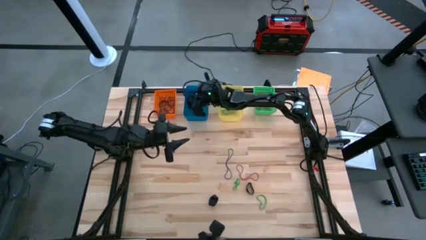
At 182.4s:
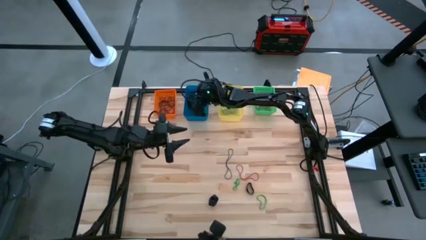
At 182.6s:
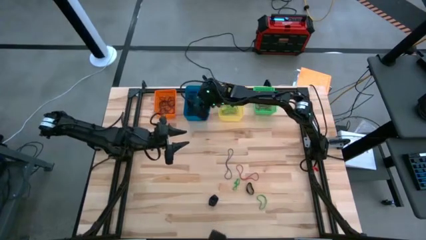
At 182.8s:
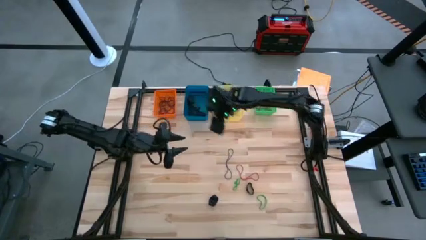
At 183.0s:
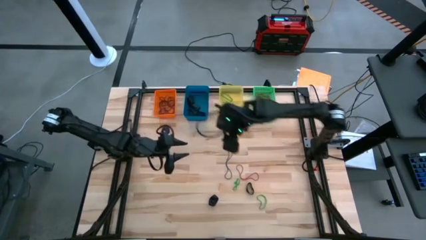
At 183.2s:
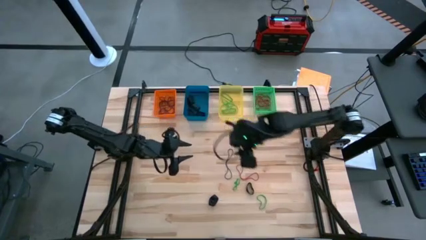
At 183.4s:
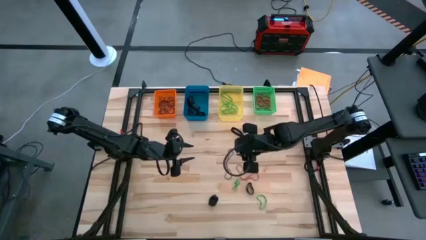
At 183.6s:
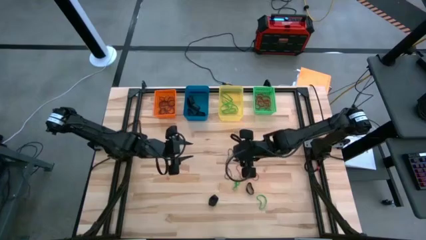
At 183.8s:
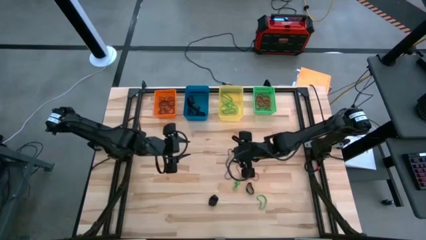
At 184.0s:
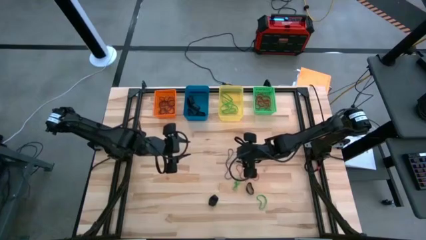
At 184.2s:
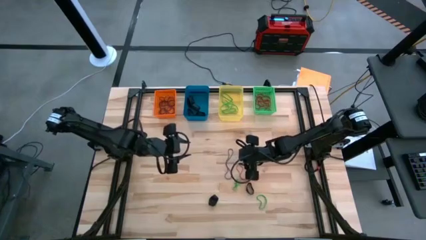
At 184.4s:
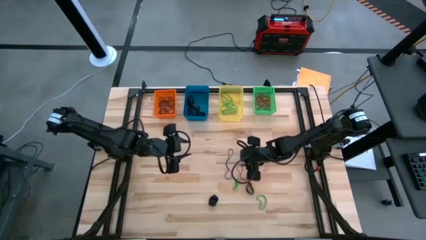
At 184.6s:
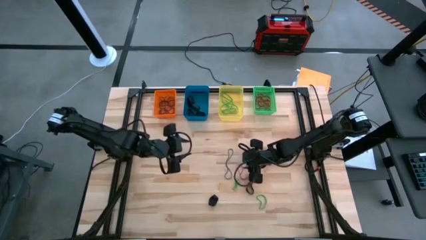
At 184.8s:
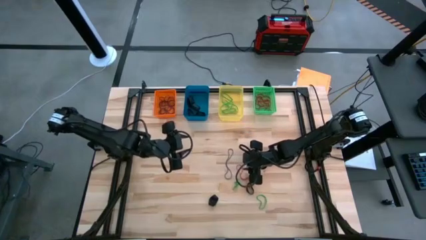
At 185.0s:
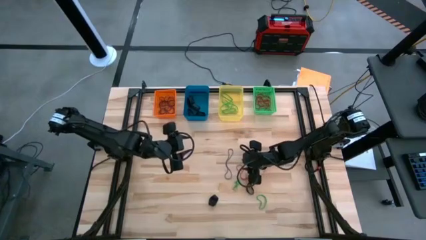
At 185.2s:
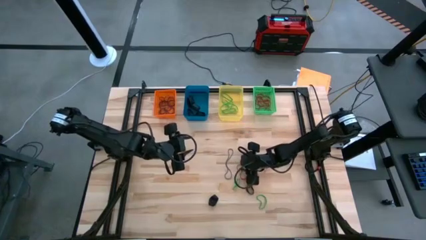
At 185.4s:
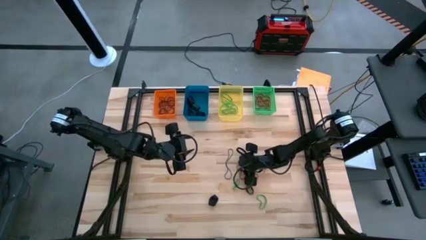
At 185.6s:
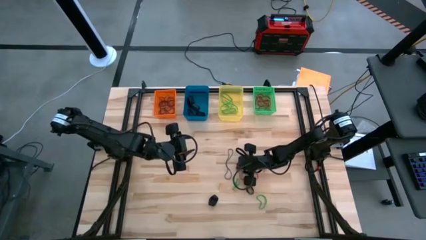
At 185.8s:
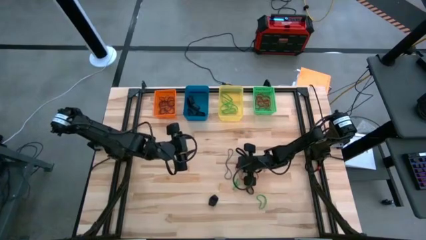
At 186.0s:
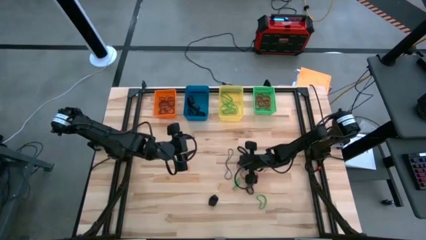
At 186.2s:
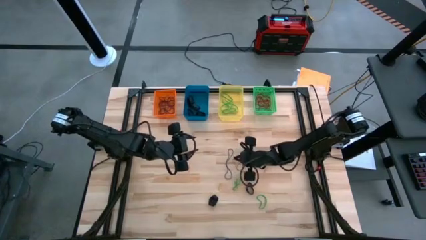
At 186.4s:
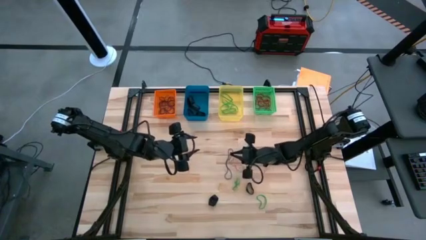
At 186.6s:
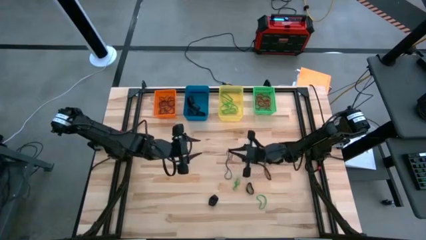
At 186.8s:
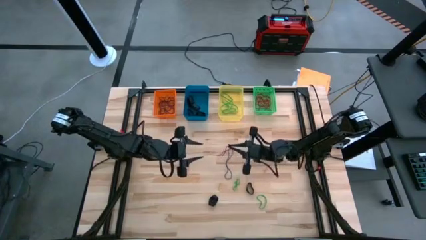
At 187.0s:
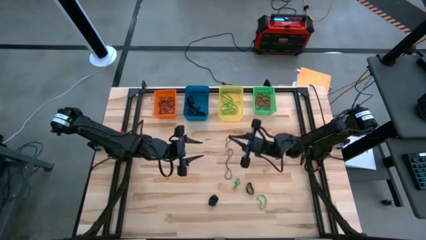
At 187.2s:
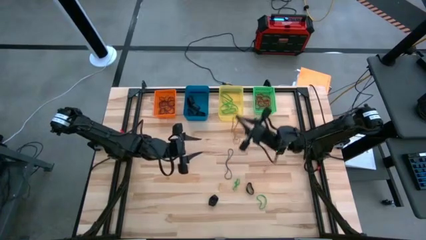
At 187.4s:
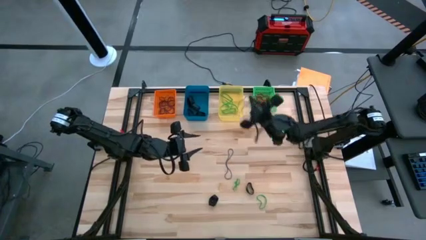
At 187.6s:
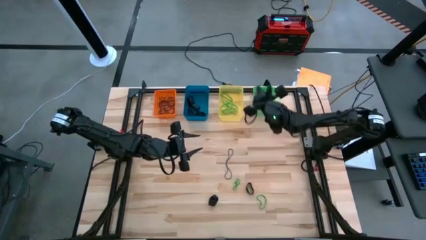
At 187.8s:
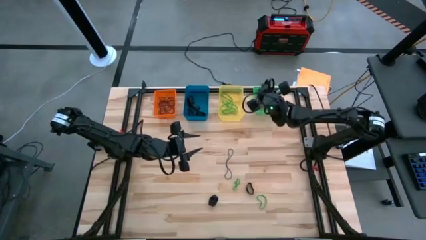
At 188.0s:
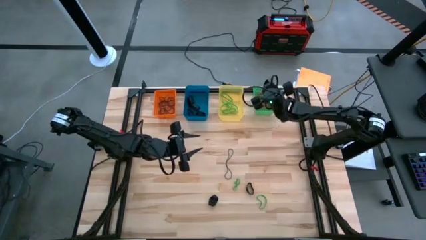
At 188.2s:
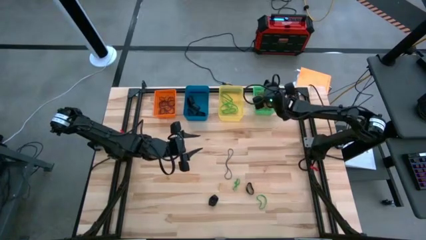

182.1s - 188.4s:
Task: Sort rubber bands into baskets
Put the red rubber band into the green bin

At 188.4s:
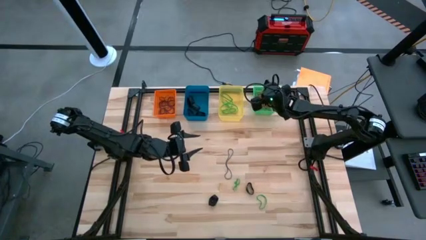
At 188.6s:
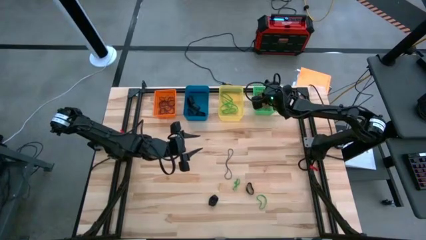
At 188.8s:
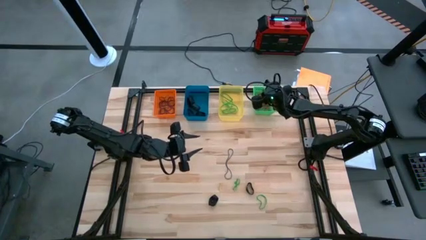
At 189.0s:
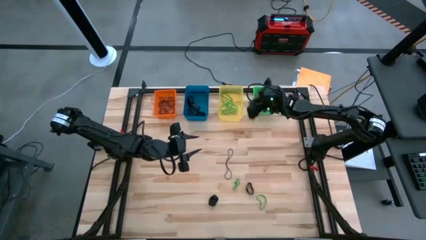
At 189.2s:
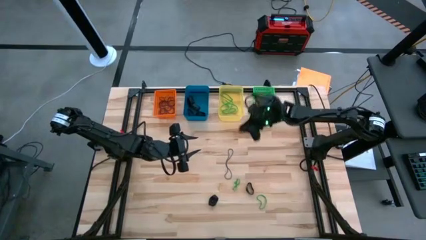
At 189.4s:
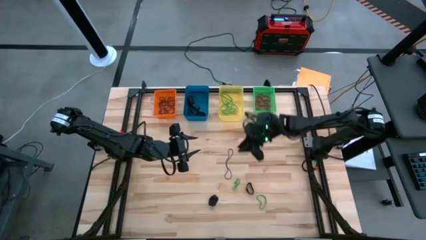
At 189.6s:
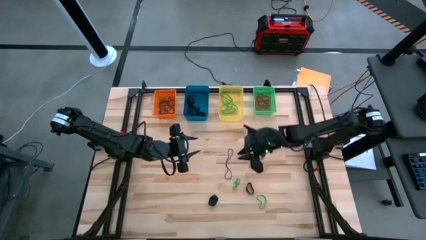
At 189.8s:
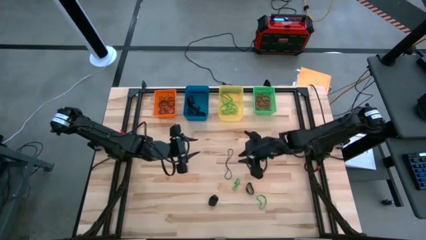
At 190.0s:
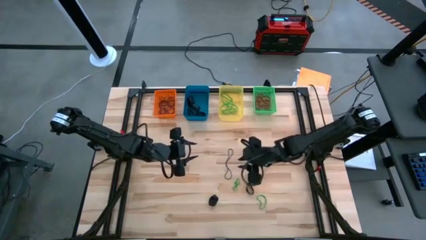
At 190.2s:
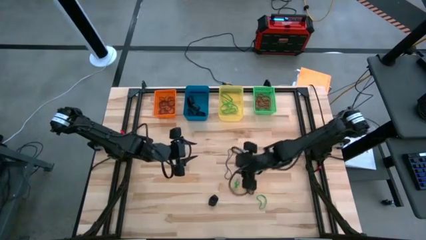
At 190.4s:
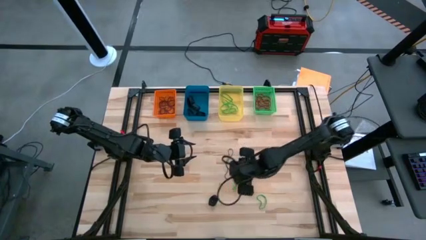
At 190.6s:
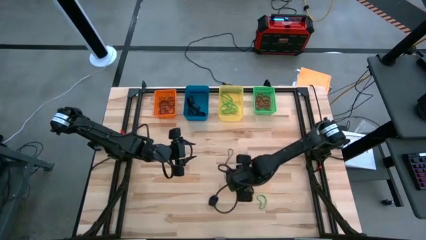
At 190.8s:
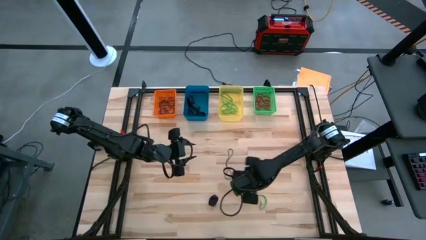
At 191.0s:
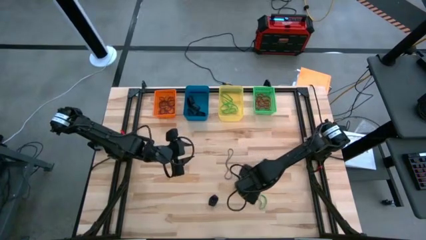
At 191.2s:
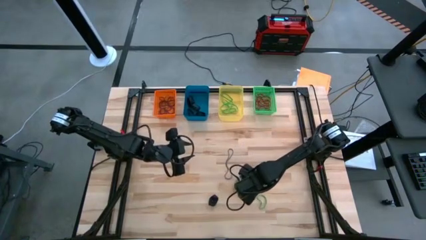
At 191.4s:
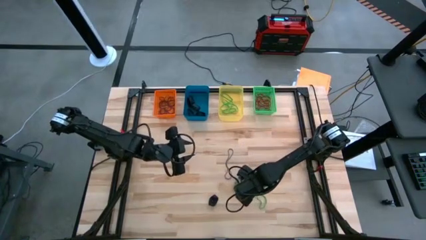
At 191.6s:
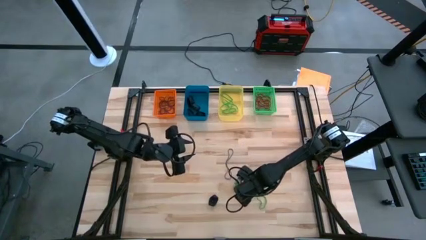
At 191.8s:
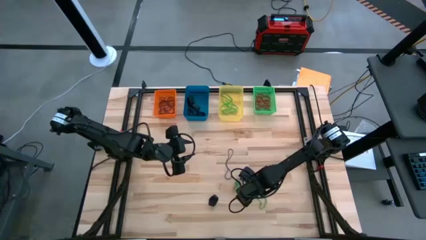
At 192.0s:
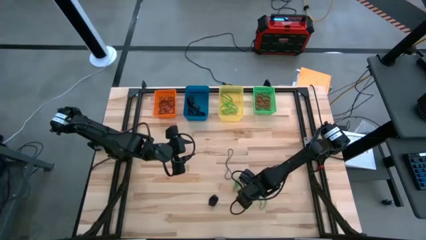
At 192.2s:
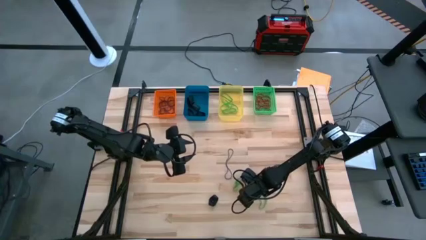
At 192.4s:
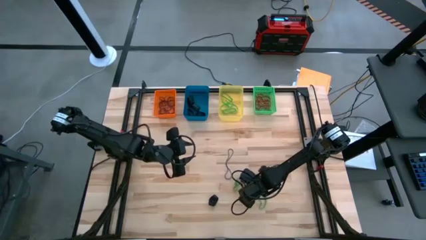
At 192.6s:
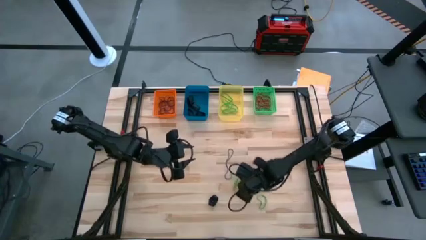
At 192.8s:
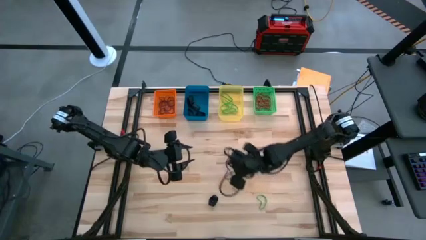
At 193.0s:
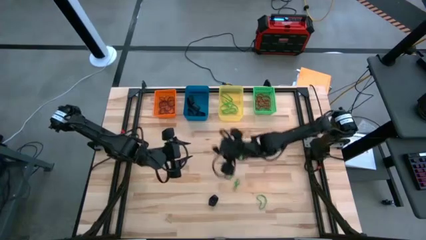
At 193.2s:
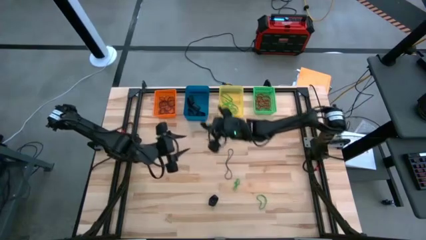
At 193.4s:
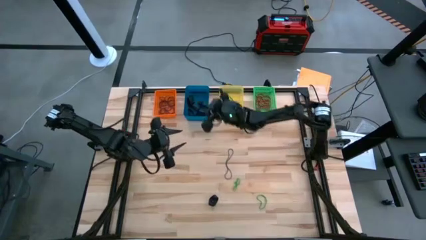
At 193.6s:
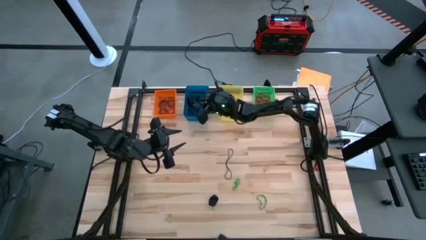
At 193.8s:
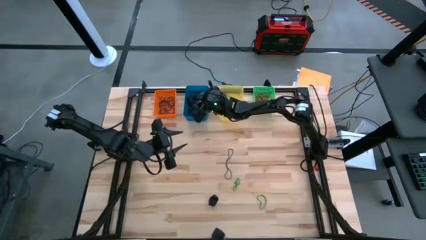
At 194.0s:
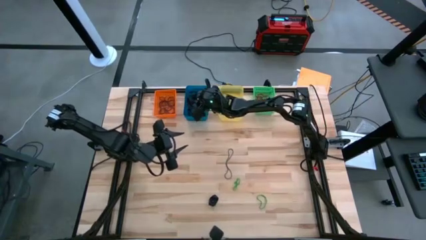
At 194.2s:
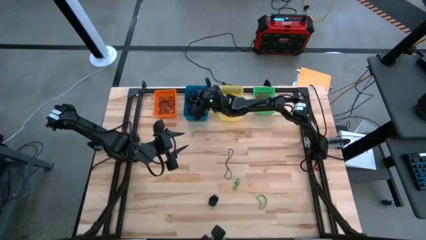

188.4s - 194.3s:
Put the black rubber band into the blue bin

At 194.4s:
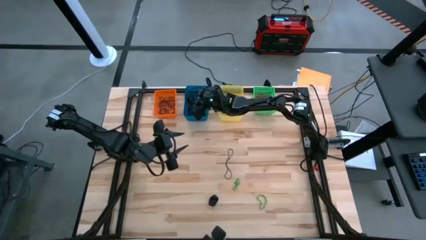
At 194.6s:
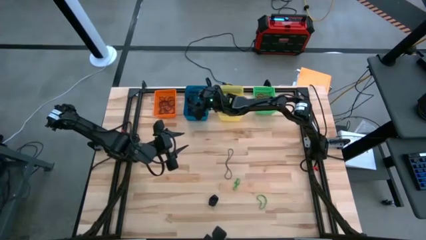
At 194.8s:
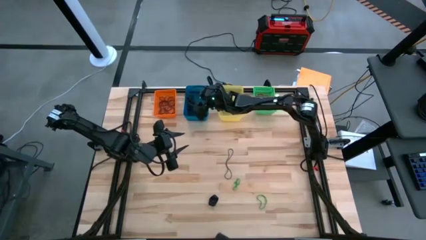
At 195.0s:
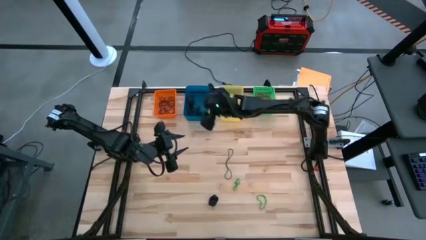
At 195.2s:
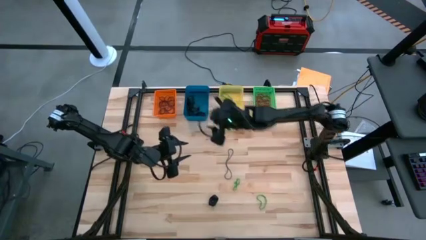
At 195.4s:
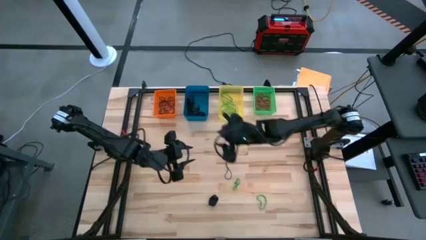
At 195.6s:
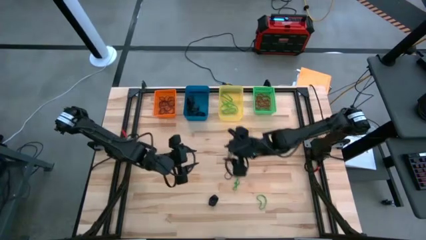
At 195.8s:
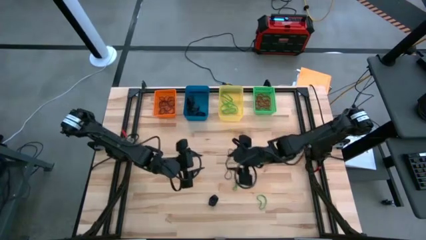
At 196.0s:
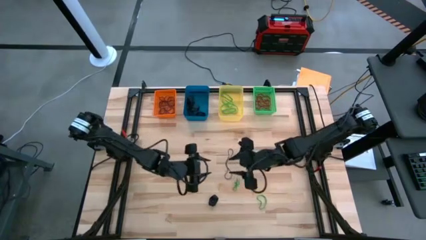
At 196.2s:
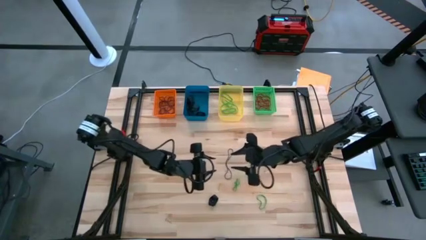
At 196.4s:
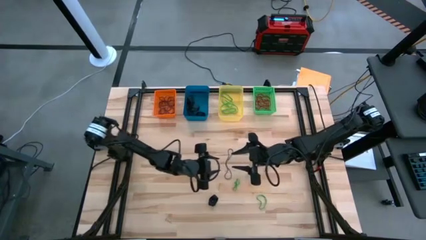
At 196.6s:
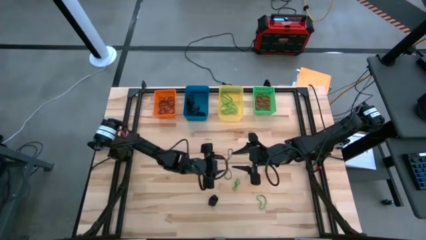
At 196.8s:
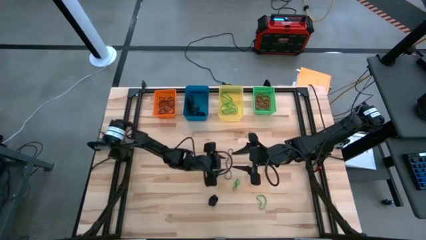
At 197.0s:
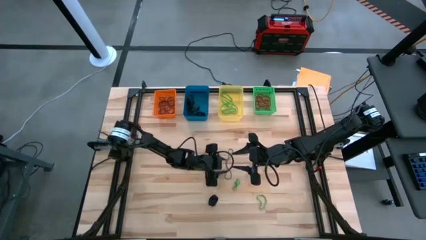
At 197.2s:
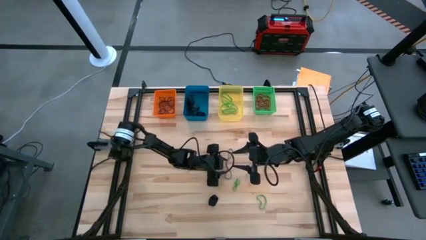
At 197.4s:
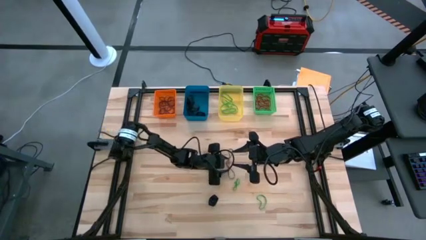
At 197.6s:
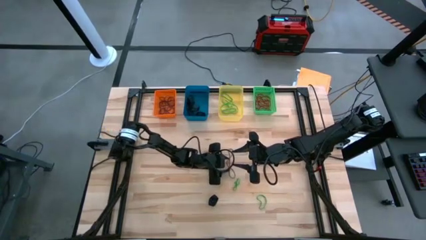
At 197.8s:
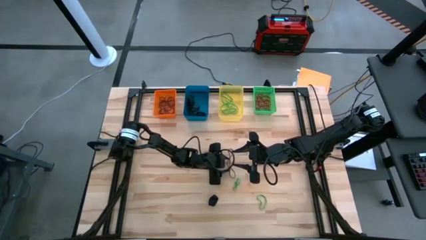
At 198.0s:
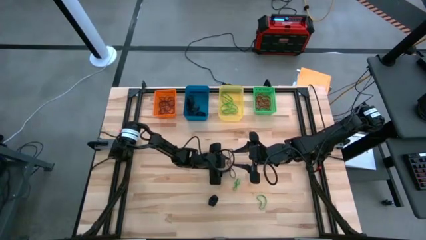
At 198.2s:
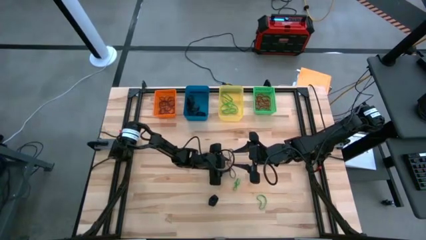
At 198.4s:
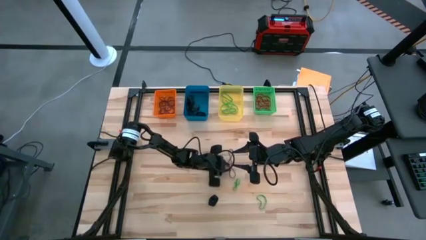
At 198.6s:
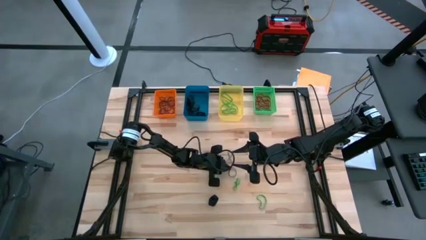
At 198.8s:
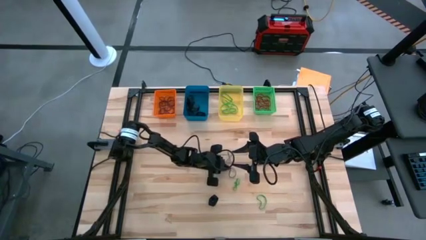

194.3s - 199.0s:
Put the violet rubber band into the orange bin
